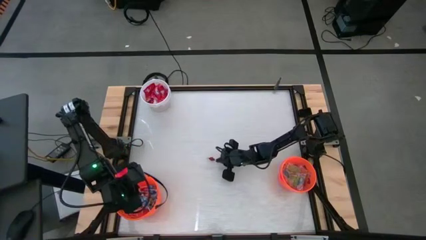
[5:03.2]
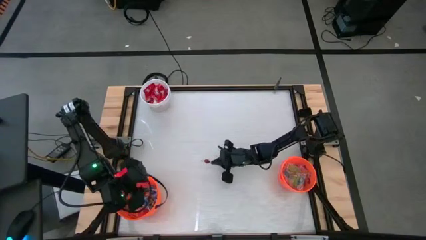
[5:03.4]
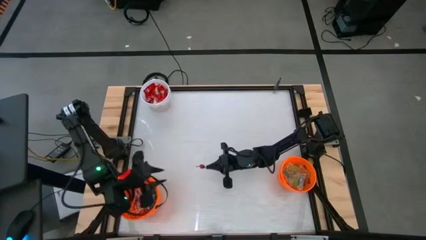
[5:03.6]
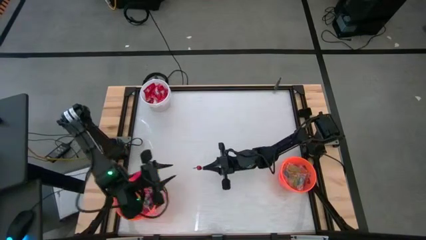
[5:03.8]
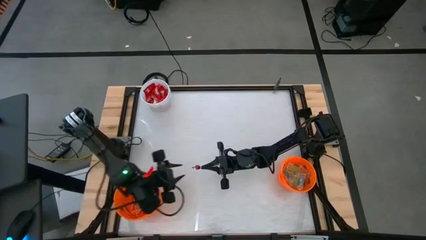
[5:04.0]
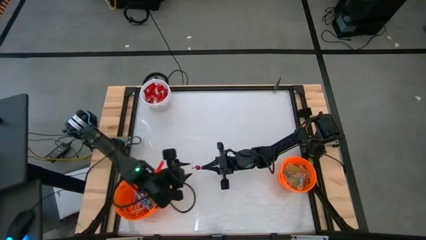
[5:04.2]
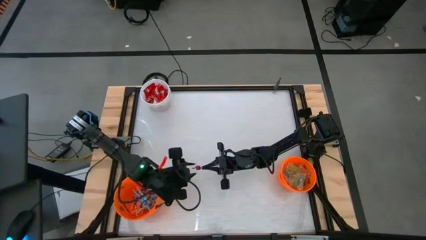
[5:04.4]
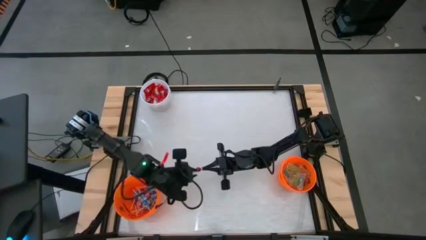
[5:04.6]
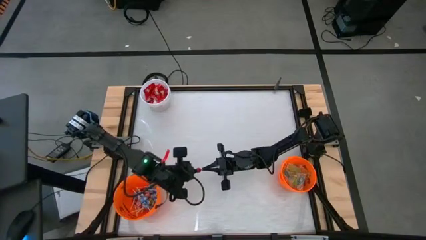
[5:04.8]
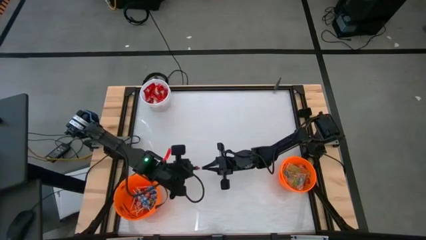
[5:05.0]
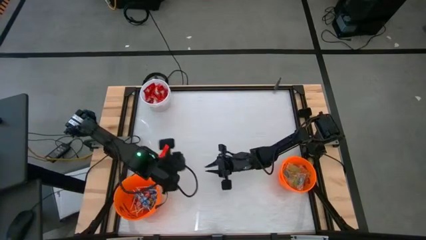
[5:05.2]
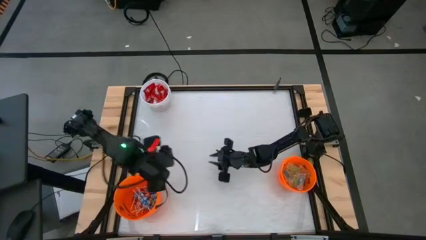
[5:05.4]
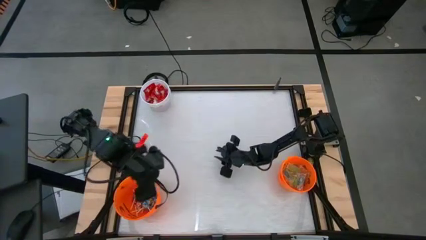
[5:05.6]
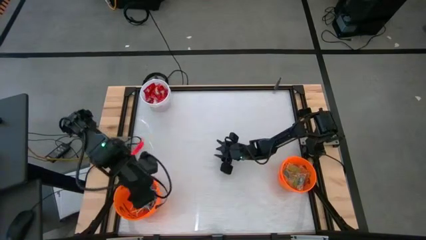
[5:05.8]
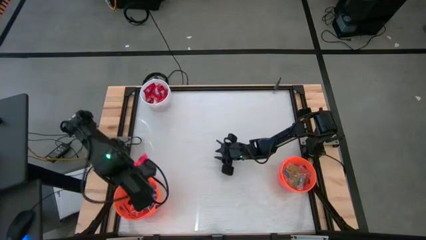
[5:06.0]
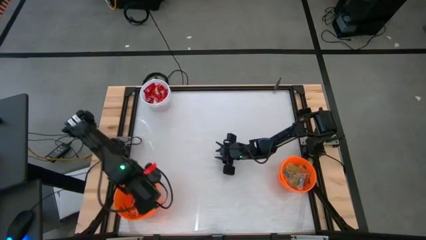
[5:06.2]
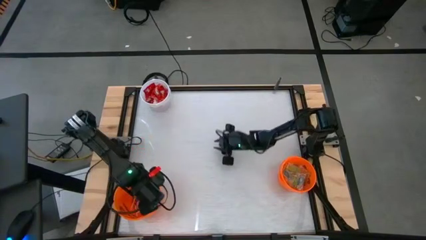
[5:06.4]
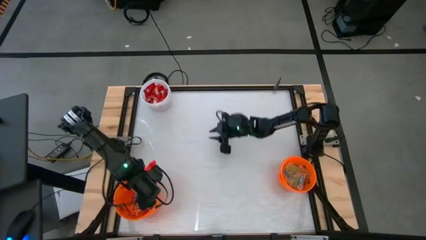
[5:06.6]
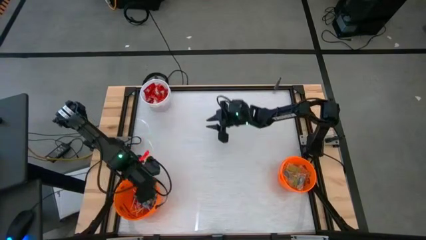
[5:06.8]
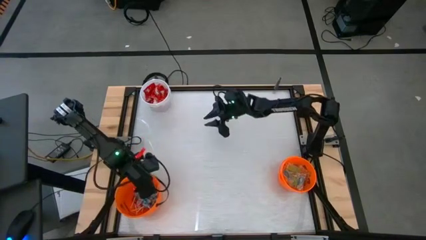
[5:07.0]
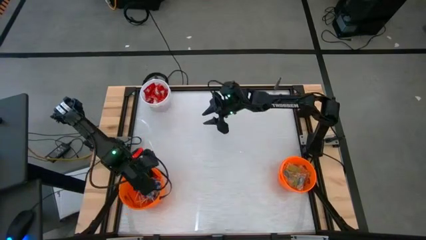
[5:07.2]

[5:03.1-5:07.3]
Task: Sort candy by brand, put in halloween buckets
Put the small red sucker into the left orange bucket

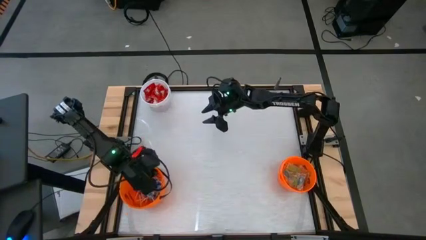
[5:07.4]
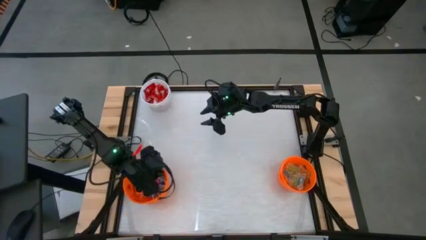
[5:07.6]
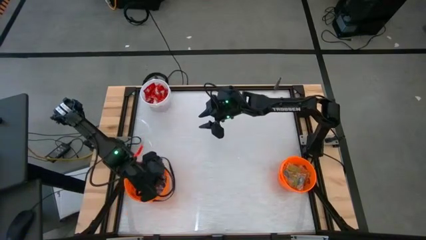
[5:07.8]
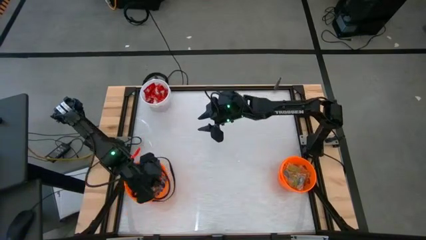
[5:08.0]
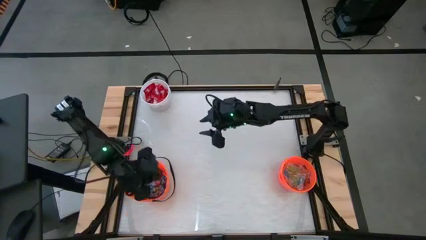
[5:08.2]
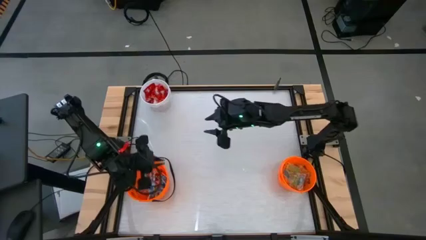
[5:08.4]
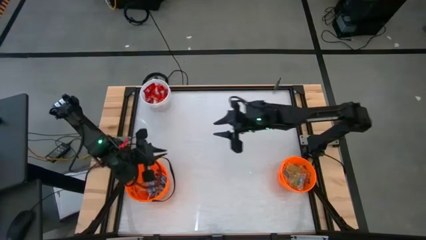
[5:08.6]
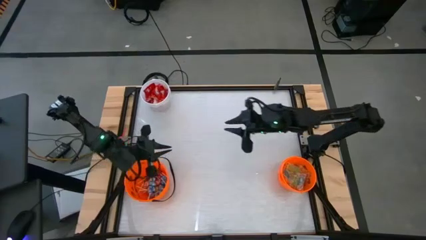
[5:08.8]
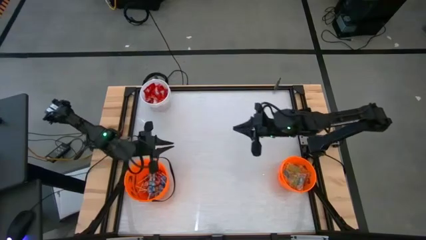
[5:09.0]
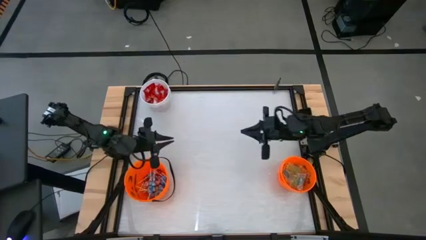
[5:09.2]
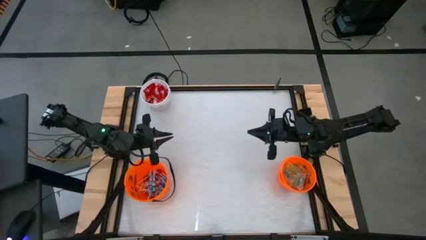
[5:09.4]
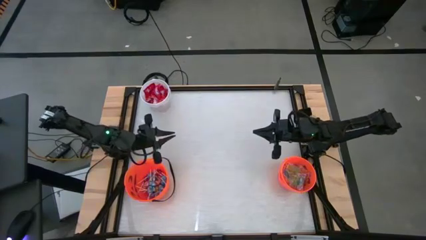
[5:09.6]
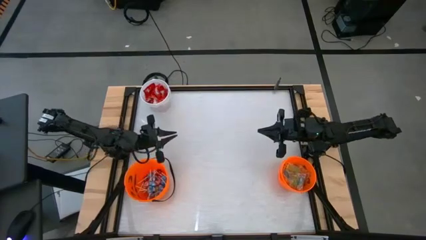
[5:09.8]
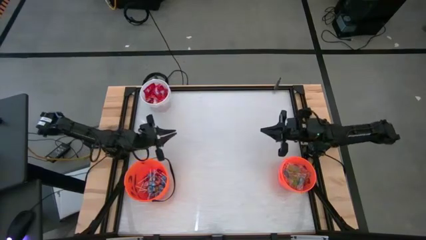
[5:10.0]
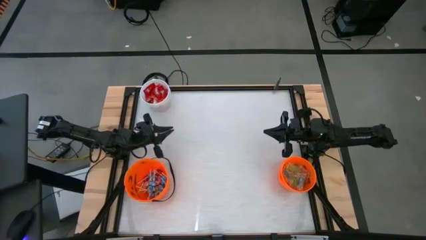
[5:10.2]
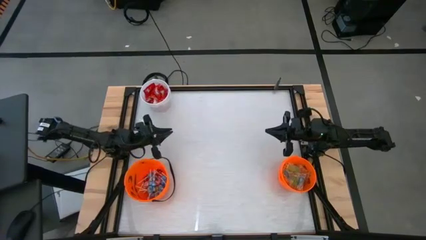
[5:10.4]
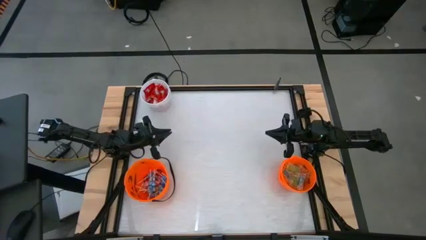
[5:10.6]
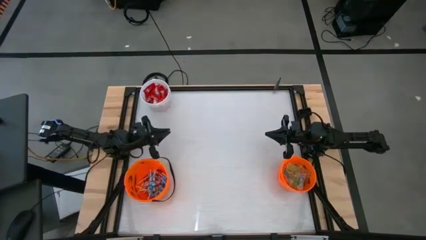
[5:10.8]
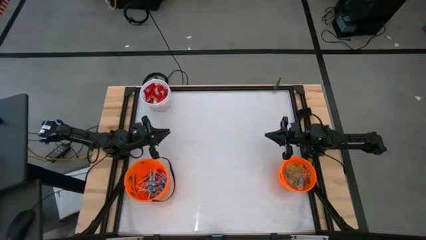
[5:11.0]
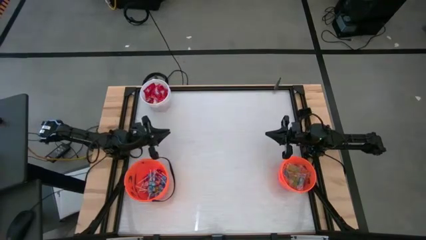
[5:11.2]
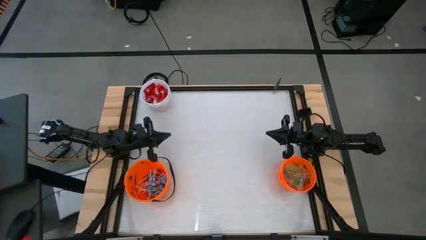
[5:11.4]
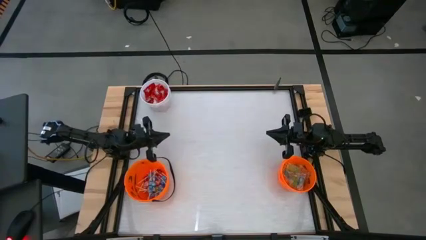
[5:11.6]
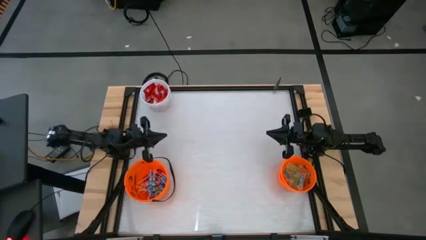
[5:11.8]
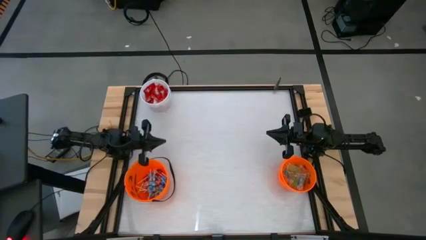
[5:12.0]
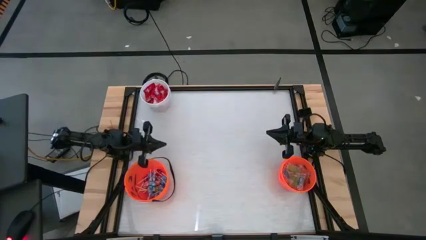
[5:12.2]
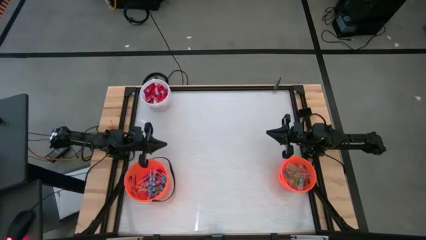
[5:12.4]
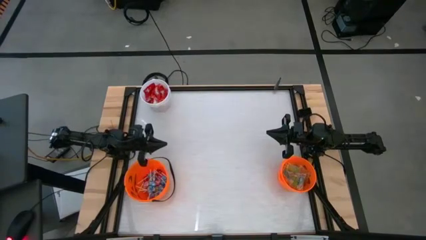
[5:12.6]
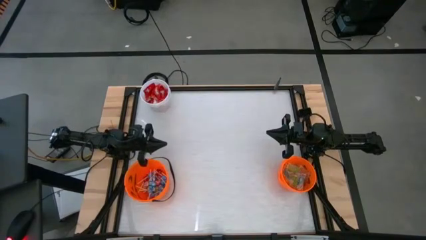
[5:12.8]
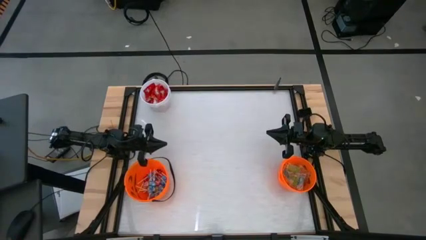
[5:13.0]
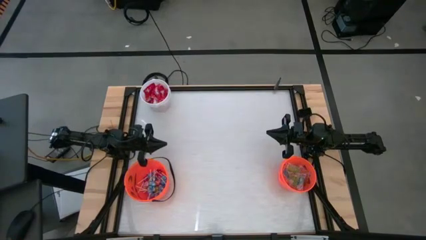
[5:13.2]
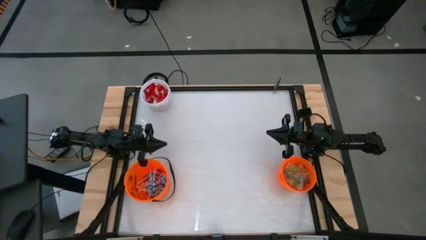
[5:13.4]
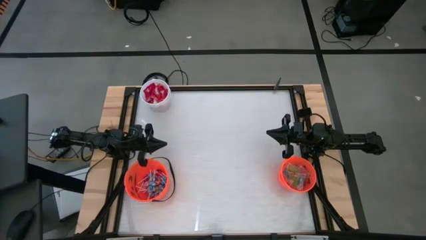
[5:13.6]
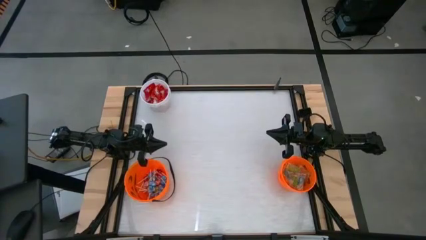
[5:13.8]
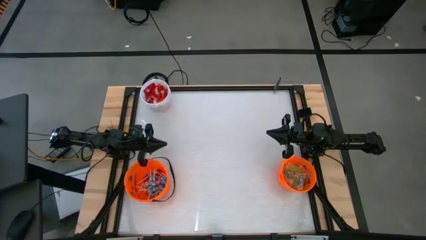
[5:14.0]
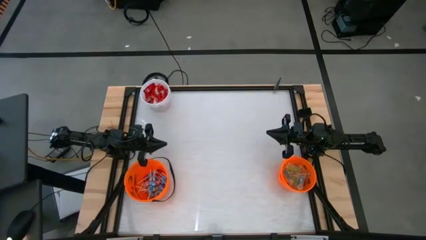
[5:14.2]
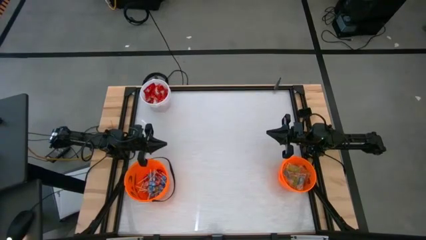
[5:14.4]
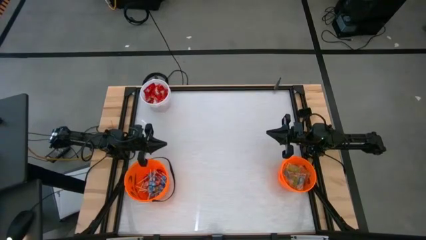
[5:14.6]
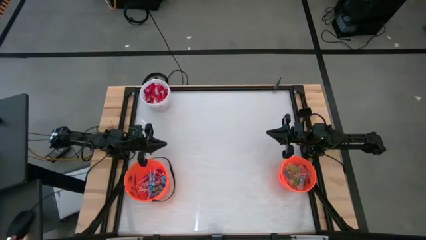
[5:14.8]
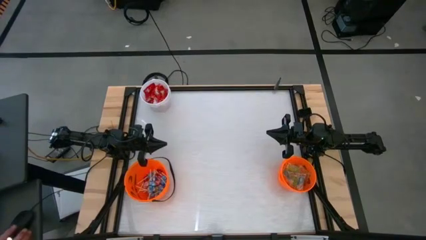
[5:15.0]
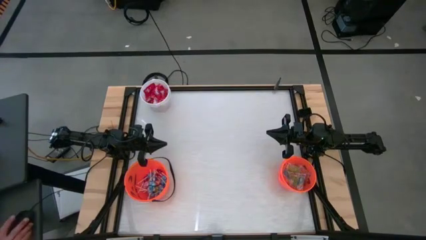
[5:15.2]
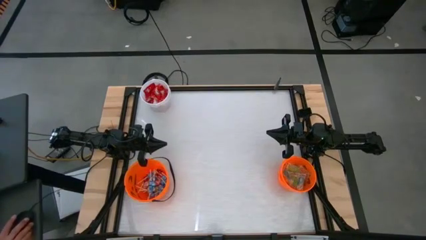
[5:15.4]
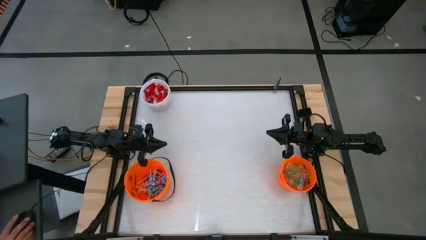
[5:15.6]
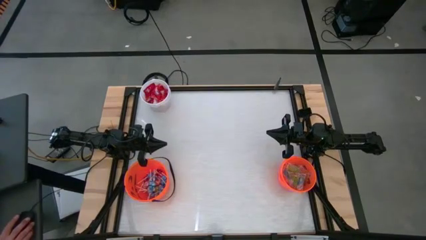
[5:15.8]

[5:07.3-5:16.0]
Return to home position

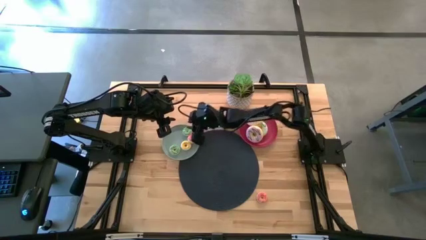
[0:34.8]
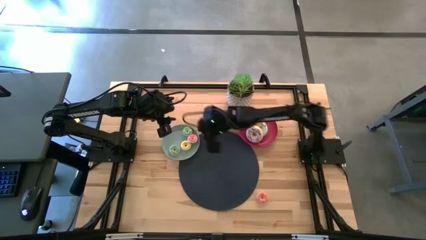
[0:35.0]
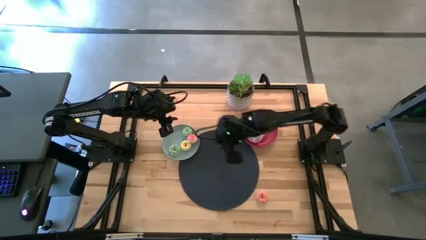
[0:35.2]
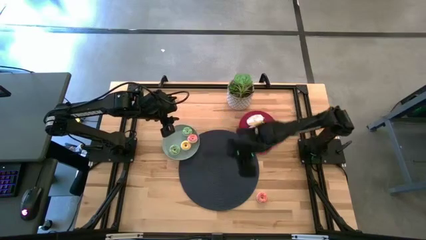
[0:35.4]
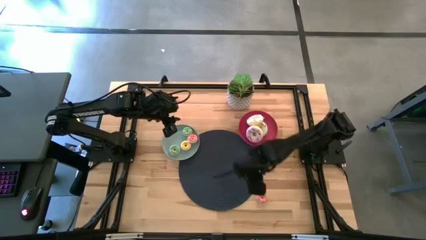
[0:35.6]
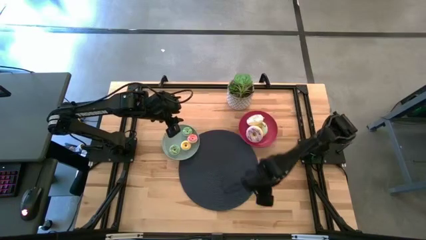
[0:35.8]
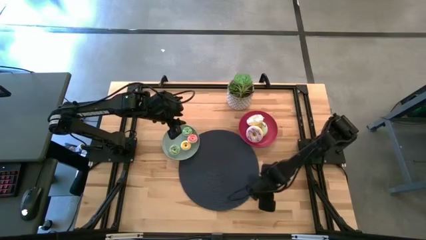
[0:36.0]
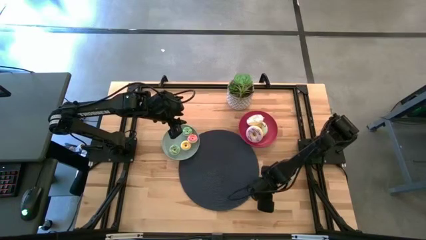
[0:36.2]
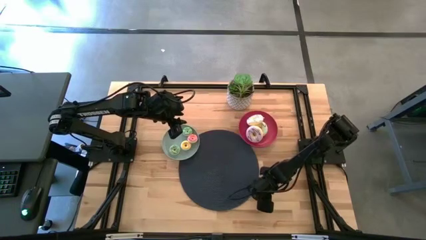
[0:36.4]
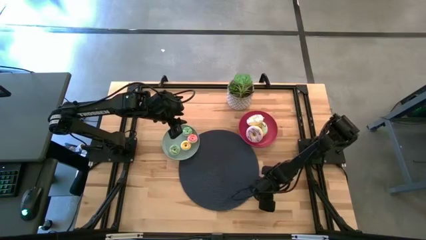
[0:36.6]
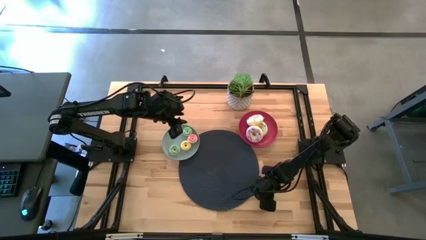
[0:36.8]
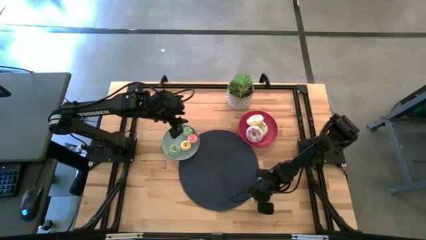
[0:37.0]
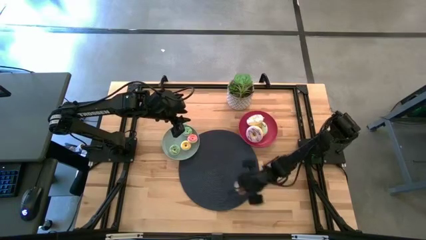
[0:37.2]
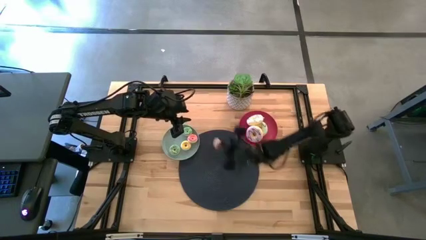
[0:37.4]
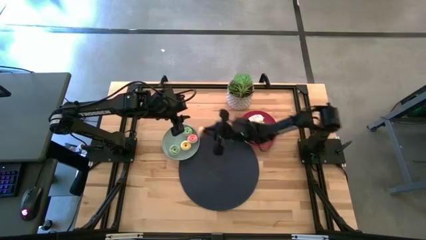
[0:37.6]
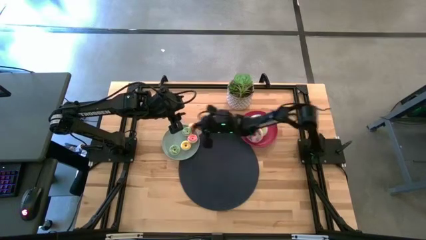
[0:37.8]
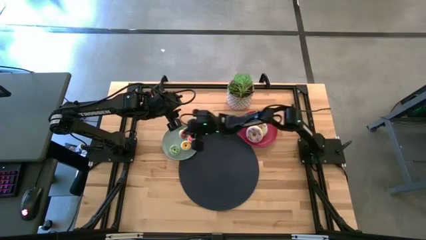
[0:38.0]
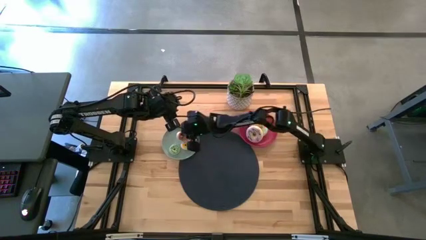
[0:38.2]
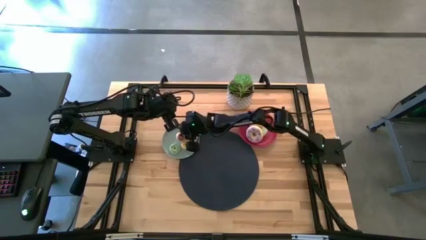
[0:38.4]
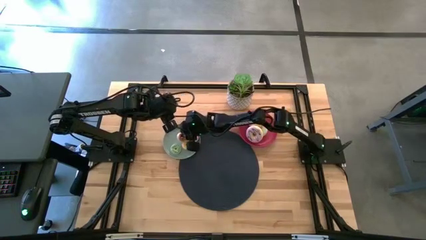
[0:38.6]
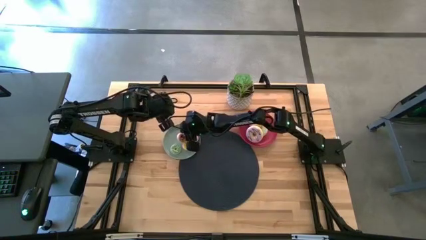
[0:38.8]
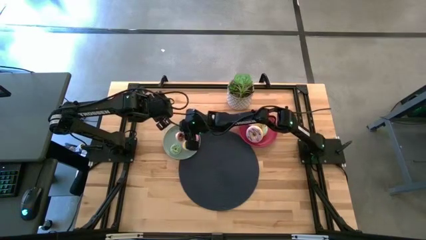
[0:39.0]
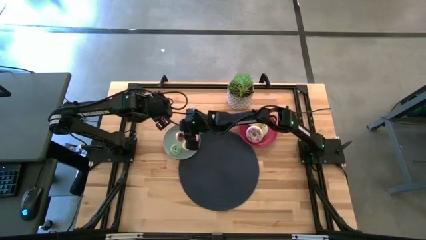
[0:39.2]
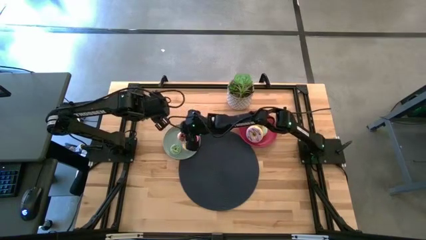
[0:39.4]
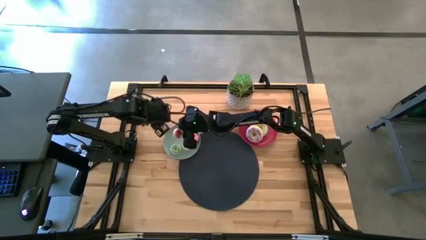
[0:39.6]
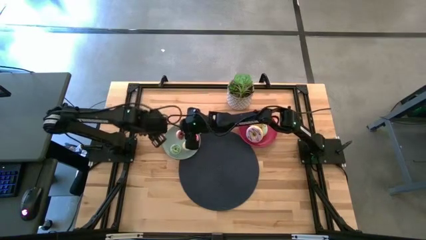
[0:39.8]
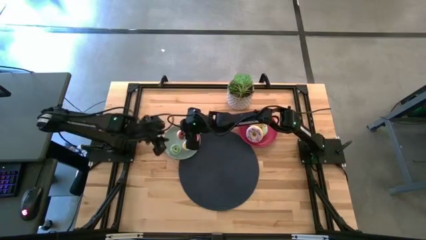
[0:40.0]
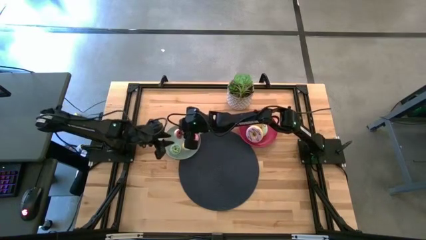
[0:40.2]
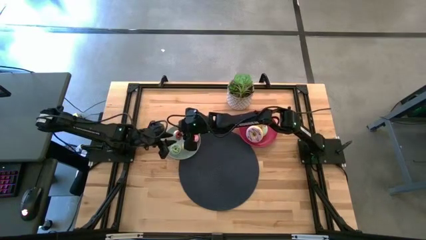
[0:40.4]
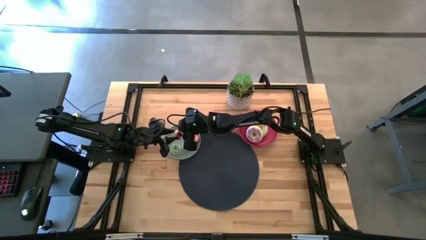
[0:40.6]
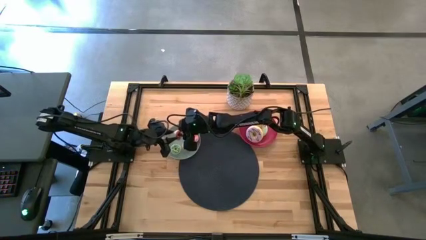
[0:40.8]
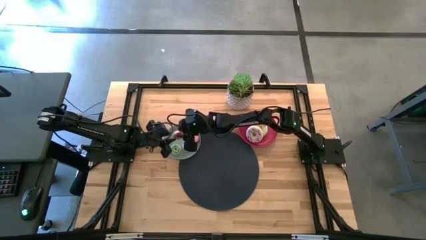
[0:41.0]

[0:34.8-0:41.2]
Task: Pick & Place donuts
Put the small pink doughnut on the blue plate
